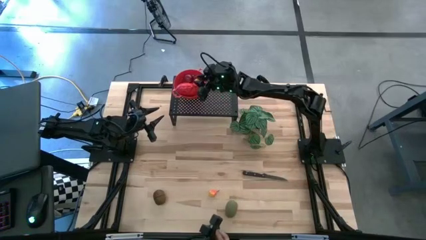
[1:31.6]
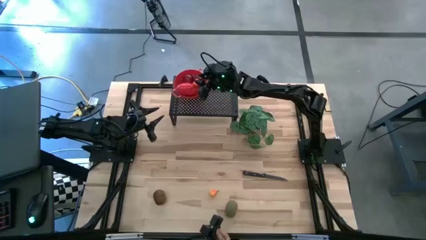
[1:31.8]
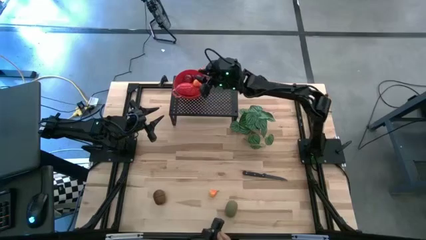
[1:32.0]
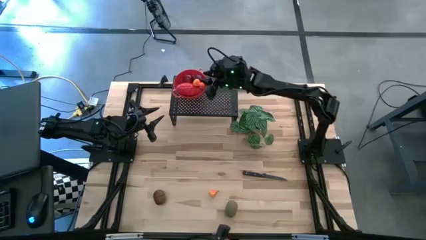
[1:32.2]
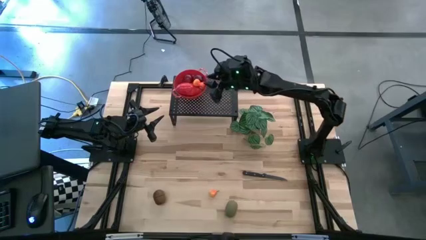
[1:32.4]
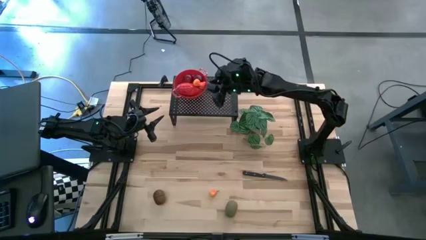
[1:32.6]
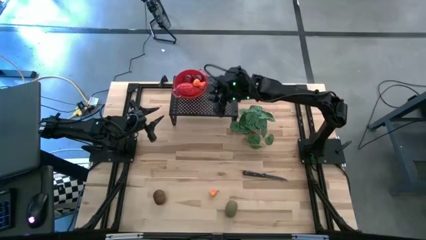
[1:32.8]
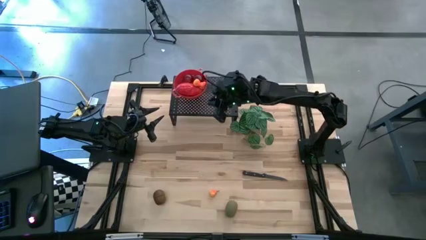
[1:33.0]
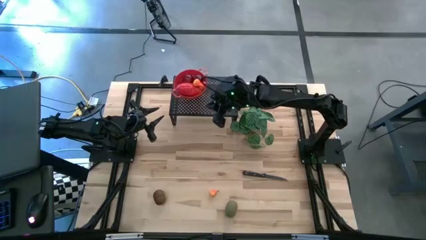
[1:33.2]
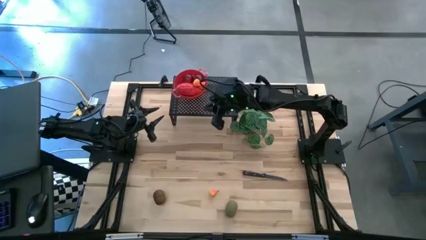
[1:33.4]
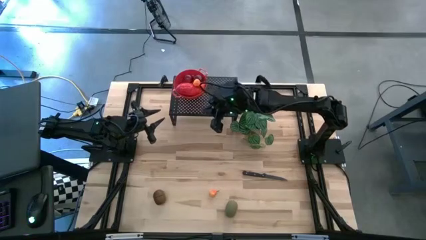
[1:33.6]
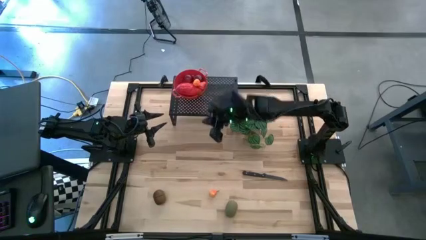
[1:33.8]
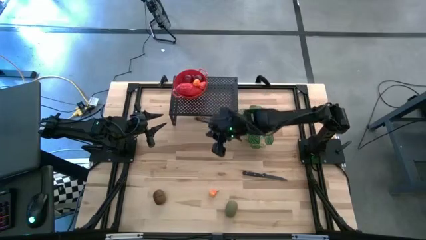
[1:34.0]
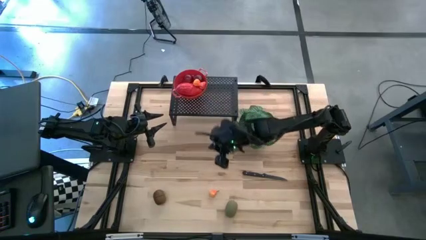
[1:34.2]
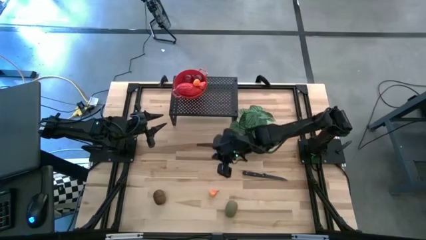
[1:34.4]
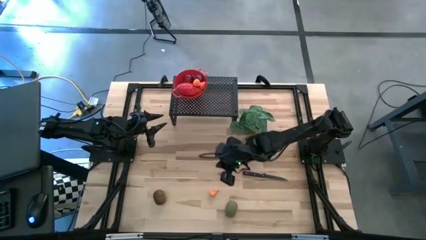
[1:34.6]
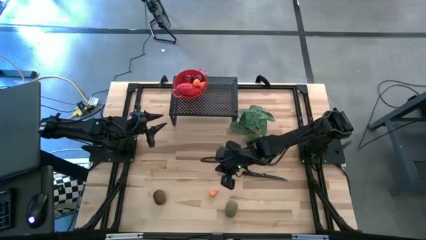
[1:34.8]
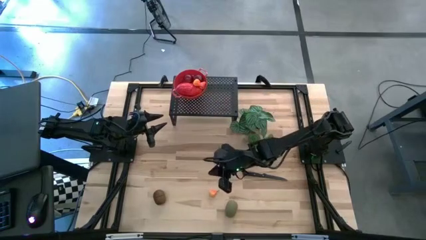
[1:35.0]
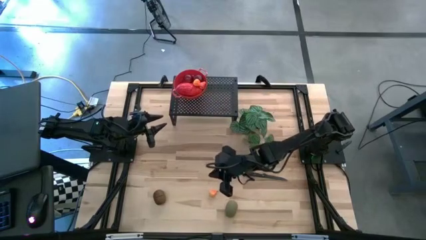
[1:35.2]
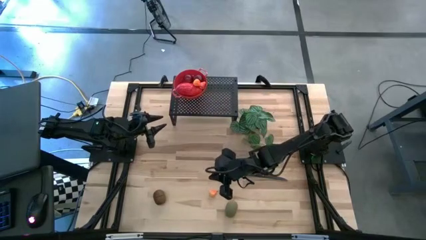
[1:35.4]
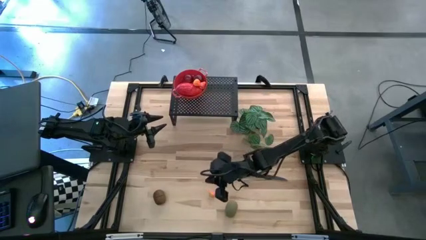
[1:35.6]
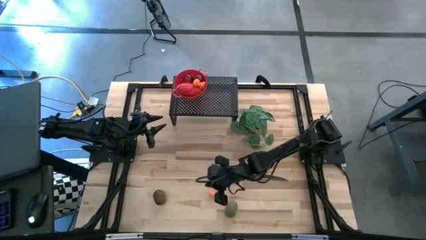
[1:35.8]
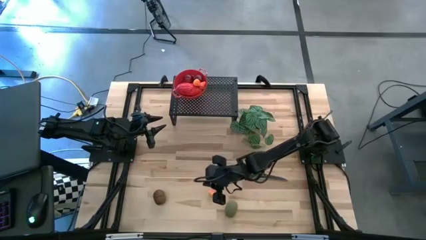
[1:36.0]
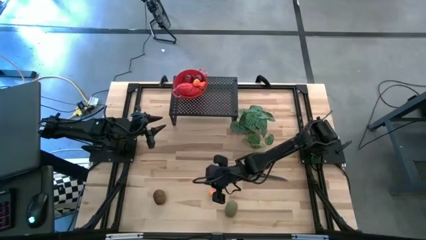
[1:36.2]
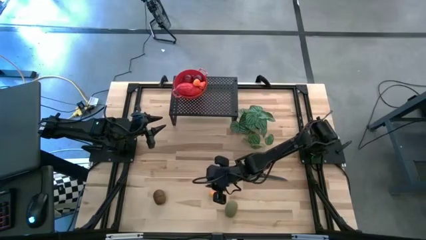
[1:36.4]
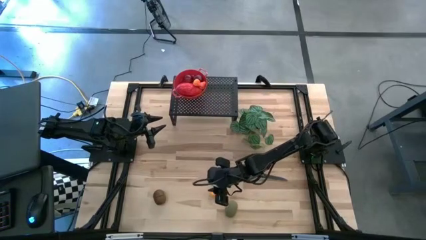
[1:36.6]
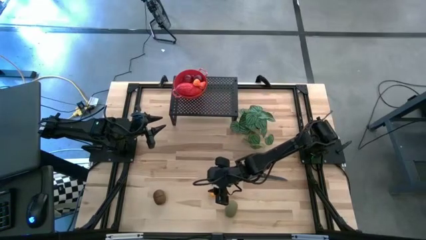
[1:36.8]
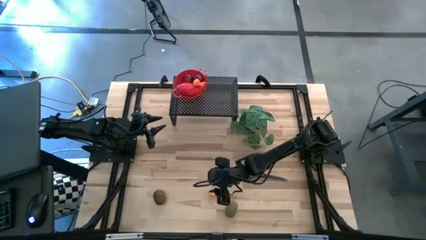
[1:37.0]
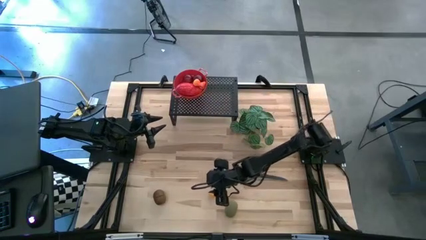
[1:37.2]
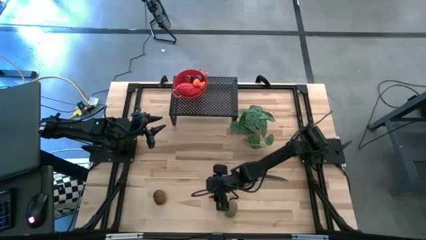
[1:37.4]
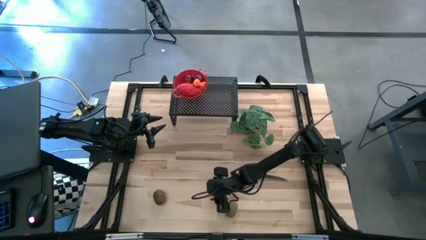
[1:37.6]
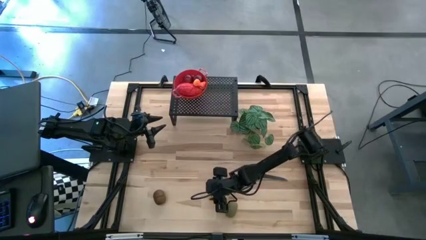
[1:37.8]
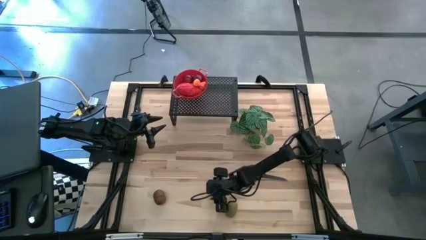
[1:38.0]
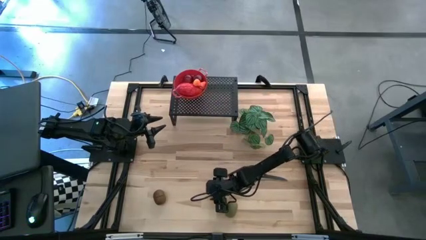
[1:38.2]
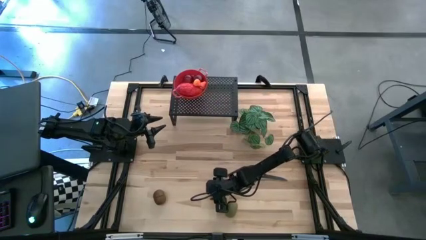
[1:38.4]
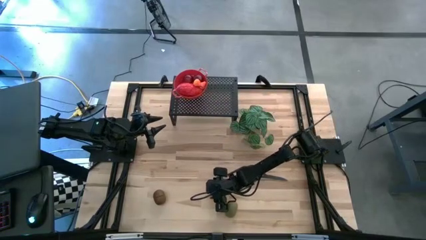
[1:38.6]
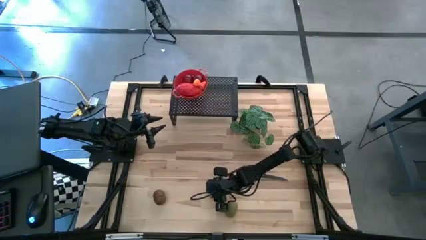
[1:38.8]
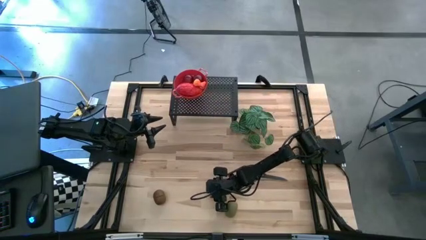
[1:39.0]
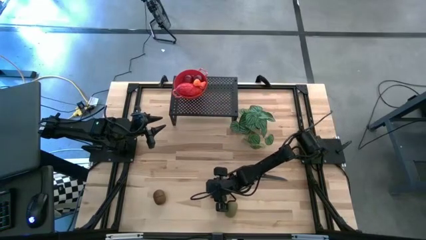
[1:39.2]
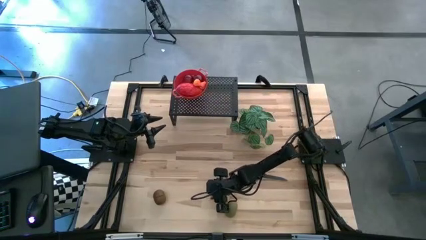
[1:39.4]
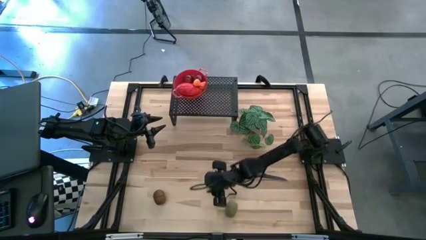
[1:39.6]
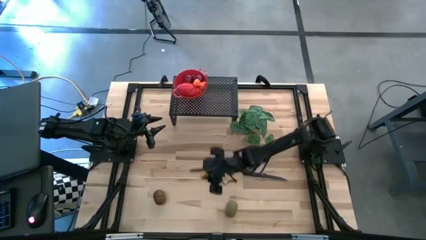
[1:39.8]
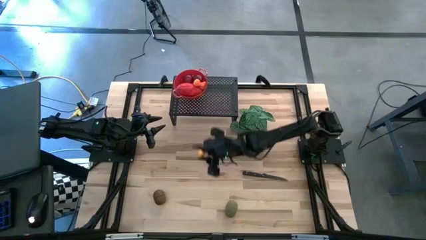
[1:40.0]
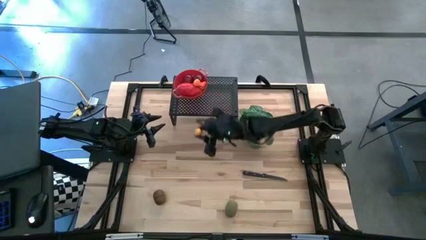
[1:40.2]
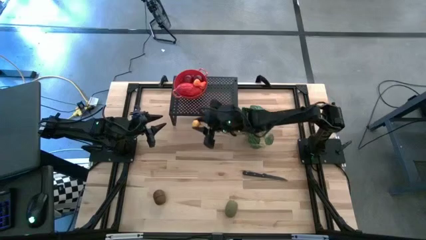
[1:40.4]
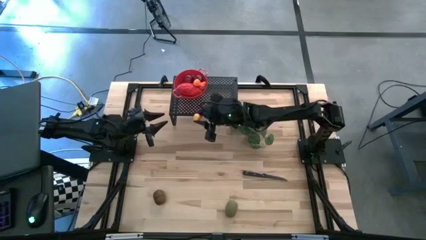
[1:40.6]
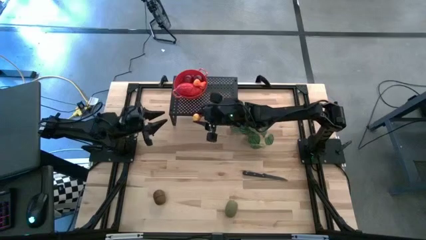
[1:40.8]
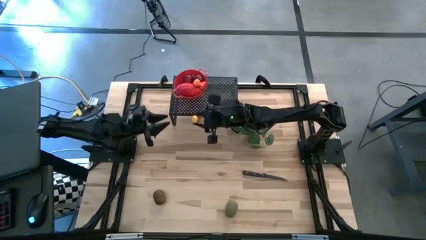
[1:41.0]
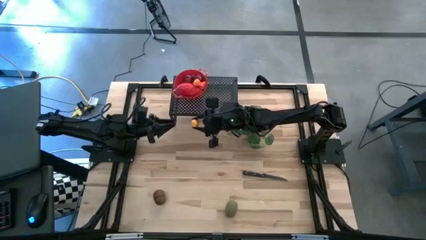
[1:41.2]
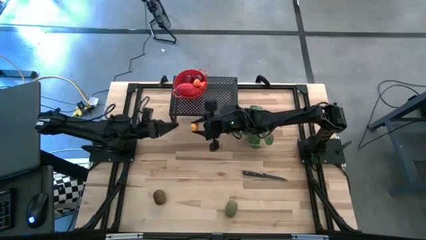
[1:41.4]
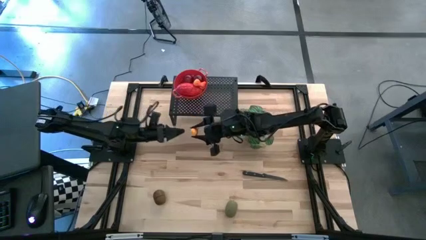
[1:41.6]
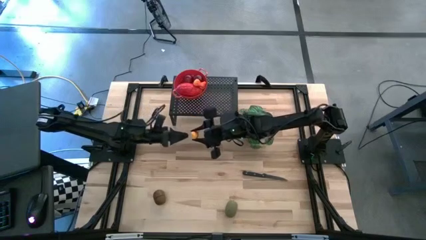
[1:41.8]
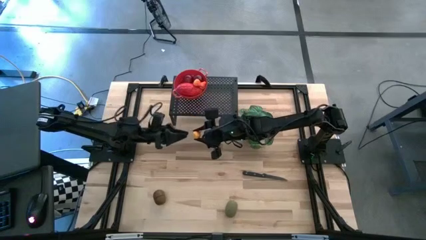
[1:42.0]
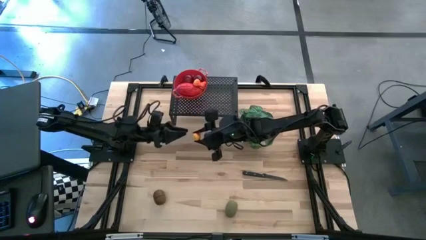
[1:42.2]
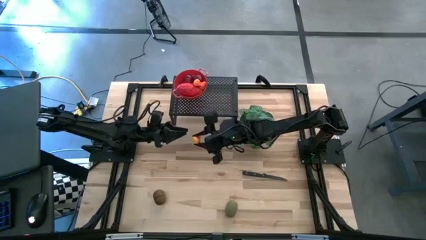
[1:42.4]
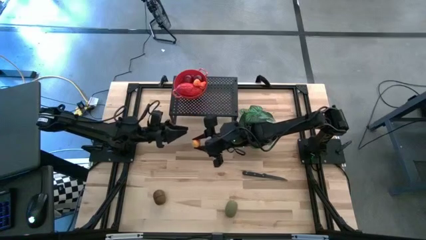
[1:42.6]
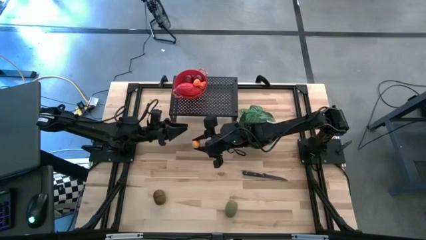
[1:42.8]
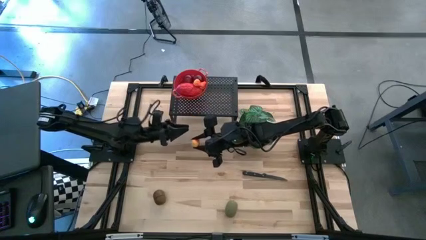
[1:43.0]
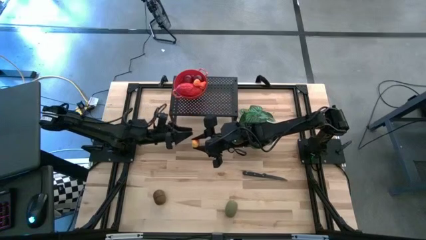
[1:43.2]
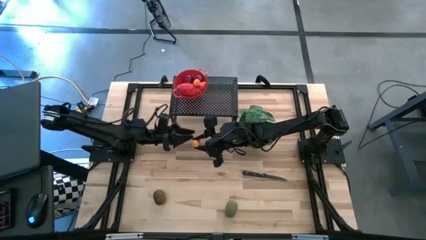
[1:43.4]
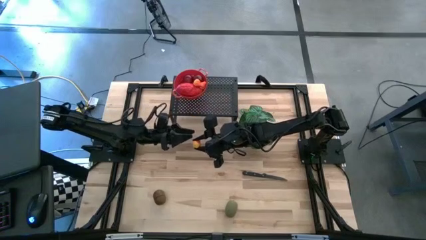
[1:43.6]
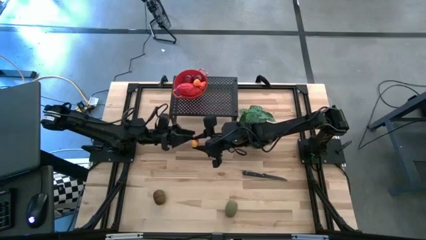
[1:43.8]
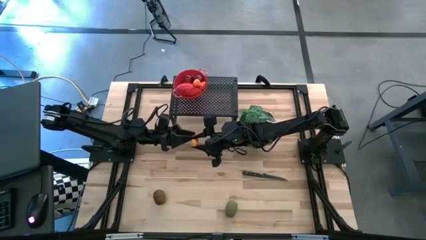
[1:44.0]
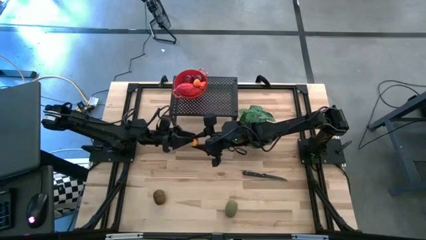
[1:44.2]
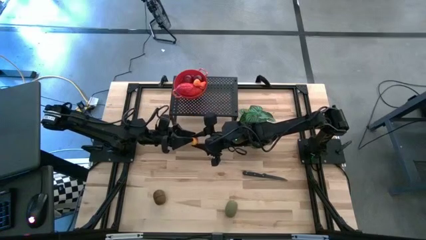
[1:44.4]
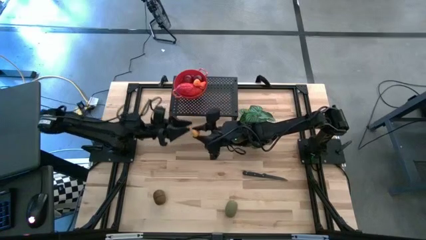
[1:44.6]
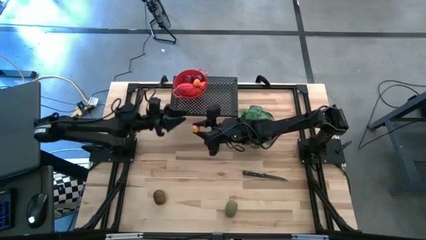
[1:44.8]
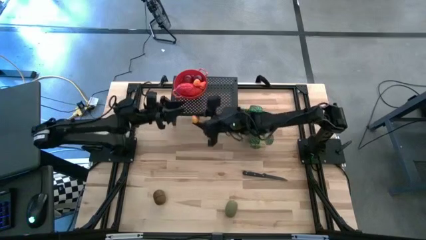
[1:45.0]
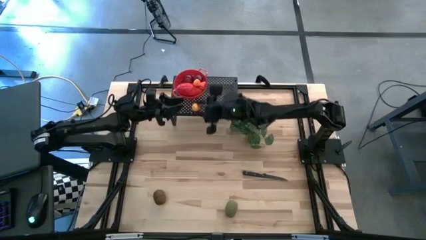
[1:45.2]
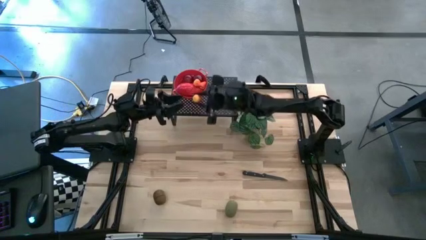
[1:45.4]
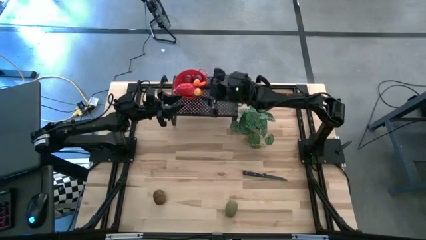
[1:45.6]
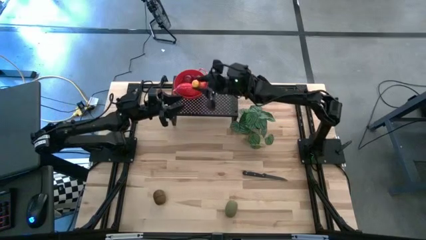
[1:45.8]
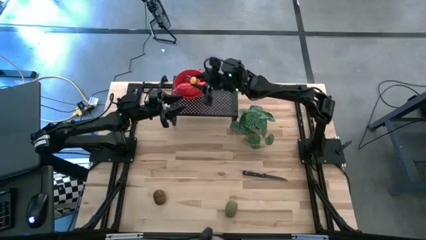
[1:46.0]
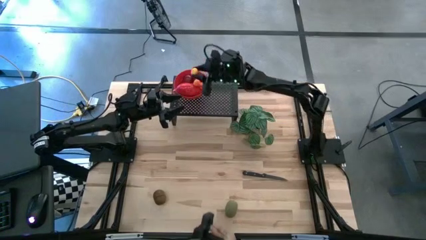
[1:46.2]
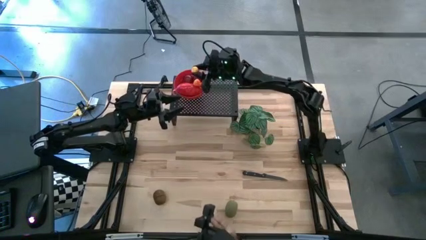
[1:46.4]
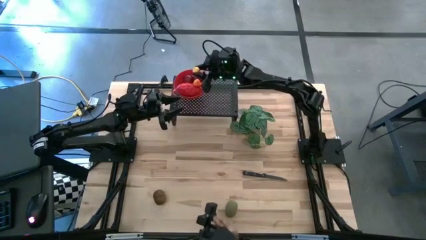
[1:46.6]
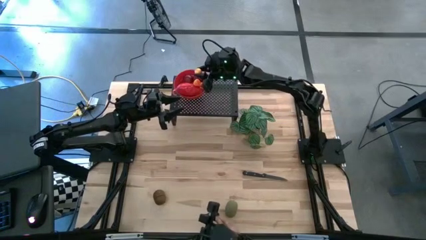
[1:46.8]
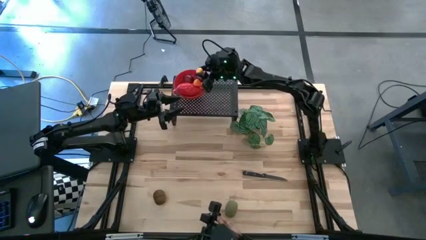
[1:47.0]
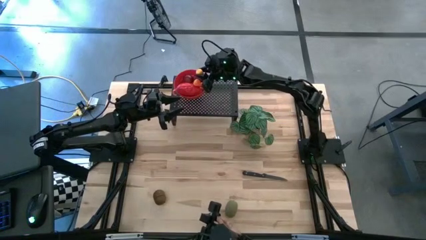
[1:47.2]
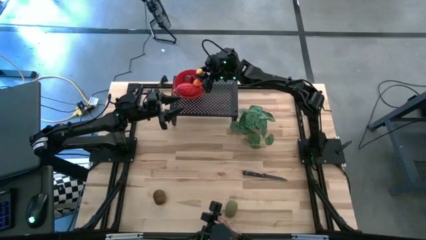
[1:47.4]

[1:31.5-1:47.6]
Task: Pick & Place Fruit
Put the yellow pear in the red strainer bowl on the shelf
